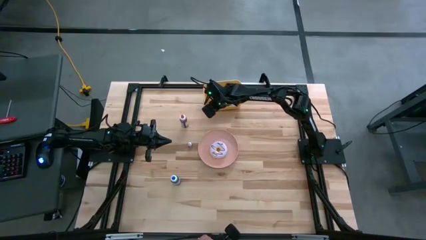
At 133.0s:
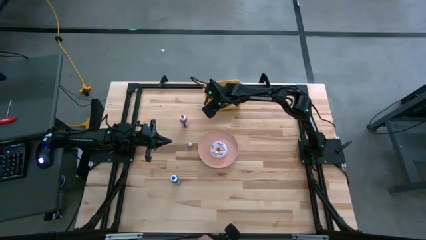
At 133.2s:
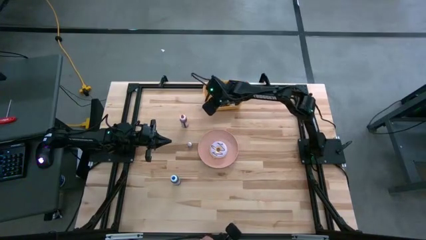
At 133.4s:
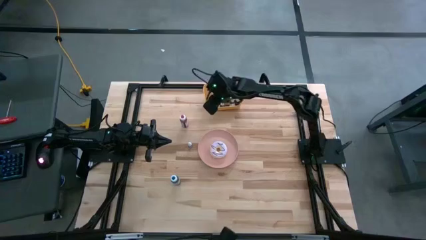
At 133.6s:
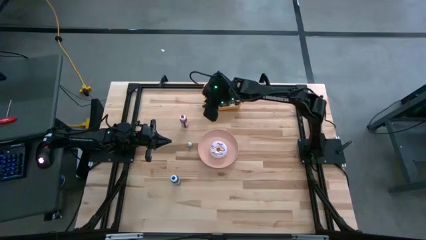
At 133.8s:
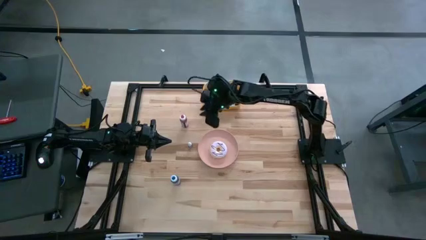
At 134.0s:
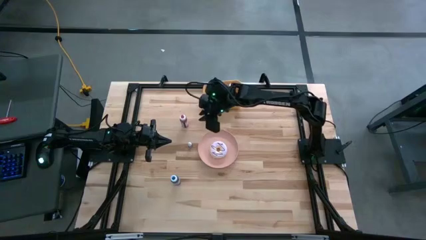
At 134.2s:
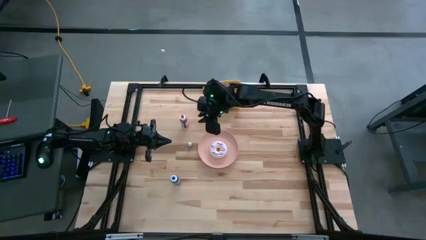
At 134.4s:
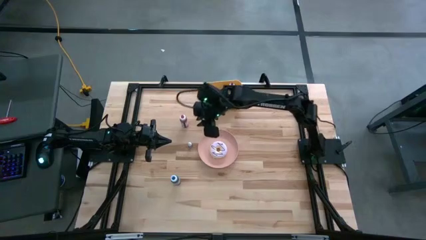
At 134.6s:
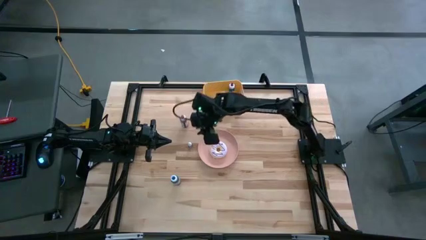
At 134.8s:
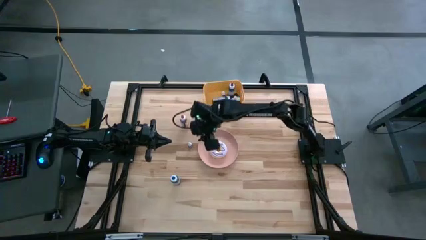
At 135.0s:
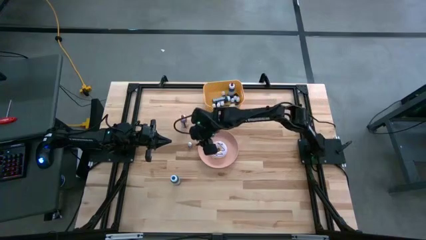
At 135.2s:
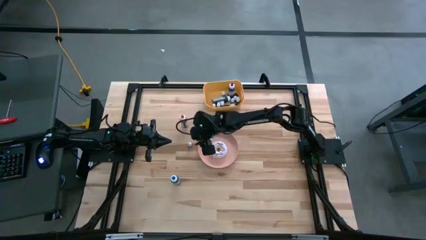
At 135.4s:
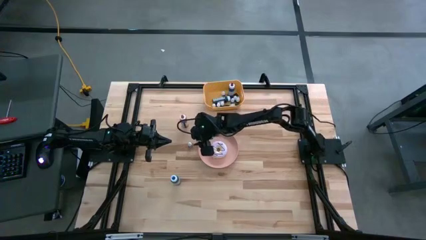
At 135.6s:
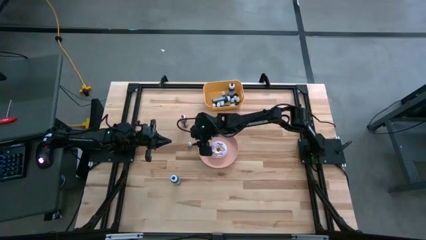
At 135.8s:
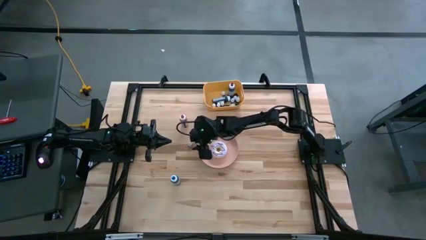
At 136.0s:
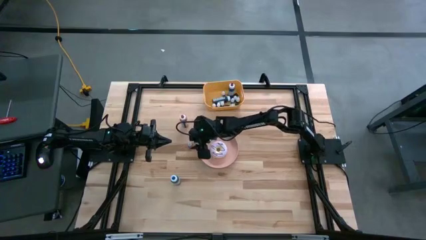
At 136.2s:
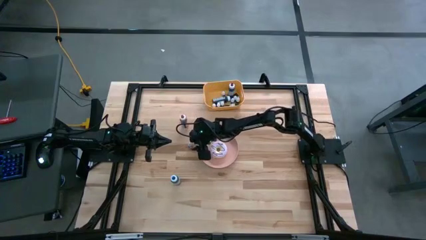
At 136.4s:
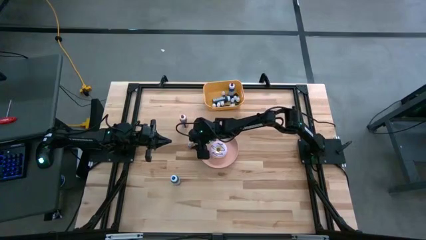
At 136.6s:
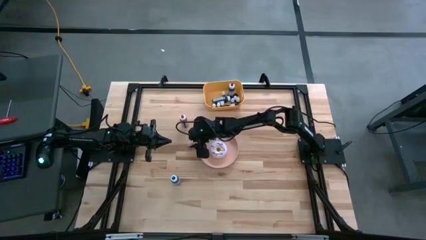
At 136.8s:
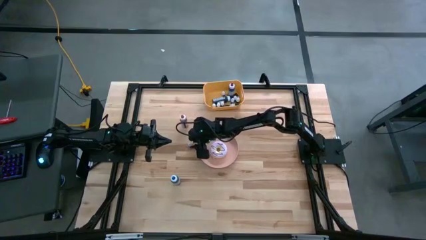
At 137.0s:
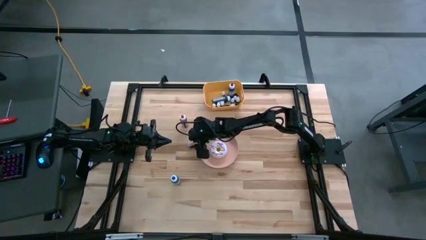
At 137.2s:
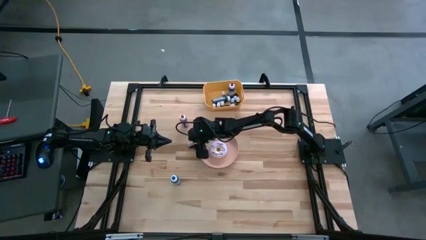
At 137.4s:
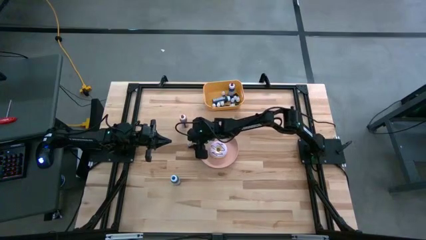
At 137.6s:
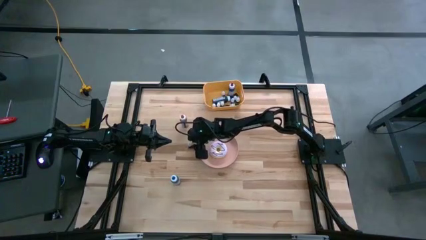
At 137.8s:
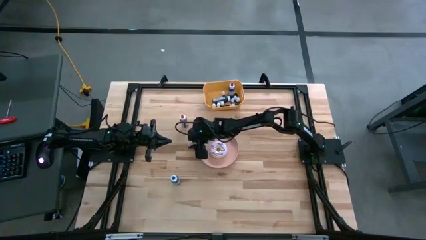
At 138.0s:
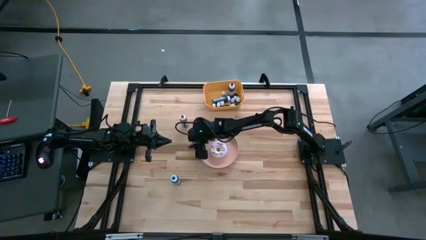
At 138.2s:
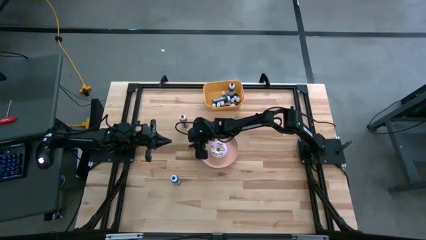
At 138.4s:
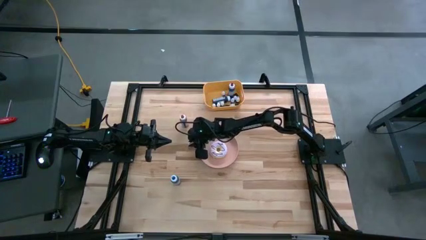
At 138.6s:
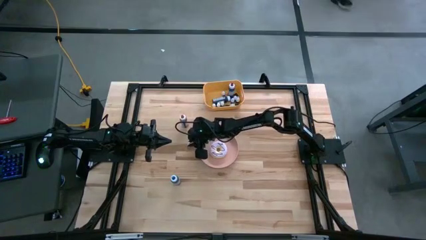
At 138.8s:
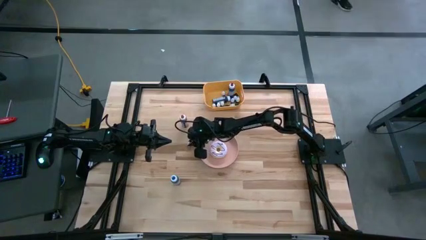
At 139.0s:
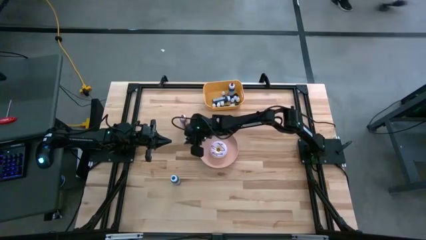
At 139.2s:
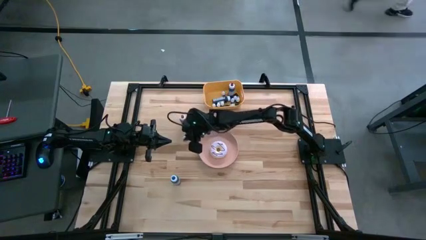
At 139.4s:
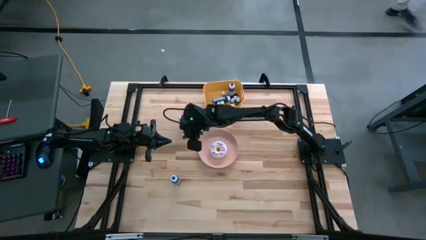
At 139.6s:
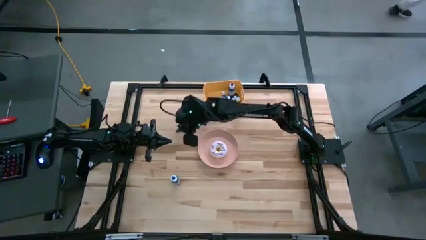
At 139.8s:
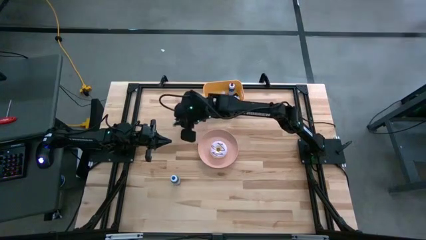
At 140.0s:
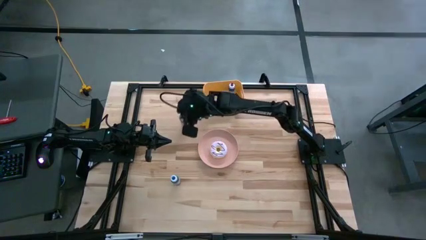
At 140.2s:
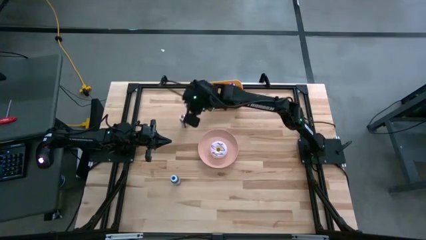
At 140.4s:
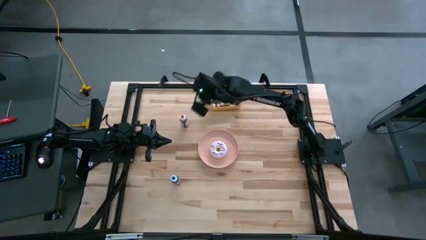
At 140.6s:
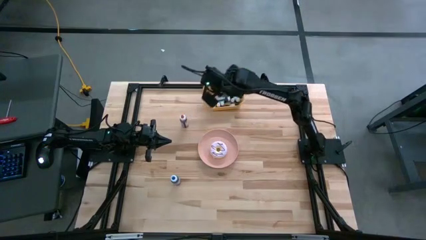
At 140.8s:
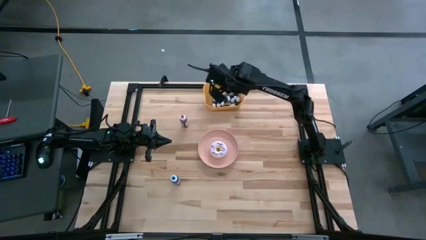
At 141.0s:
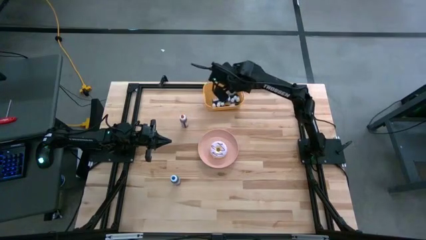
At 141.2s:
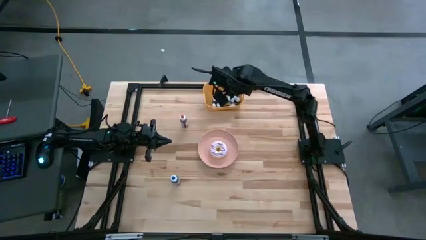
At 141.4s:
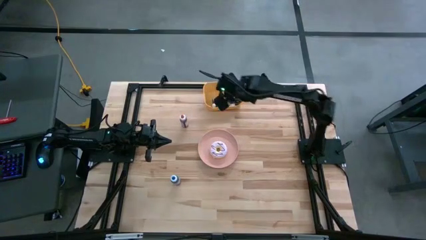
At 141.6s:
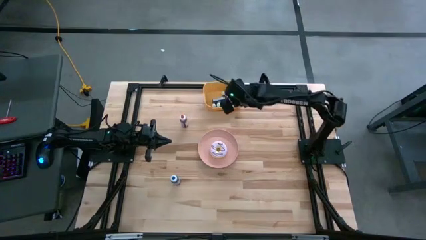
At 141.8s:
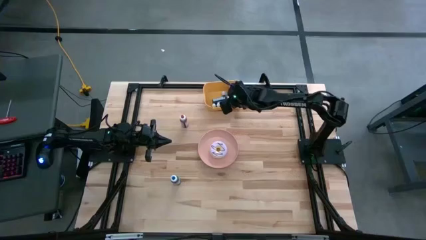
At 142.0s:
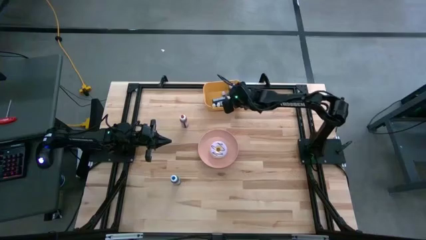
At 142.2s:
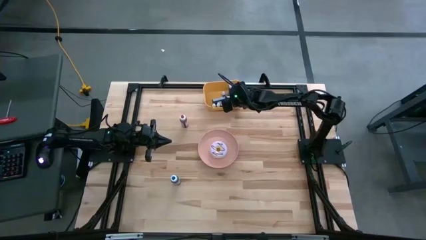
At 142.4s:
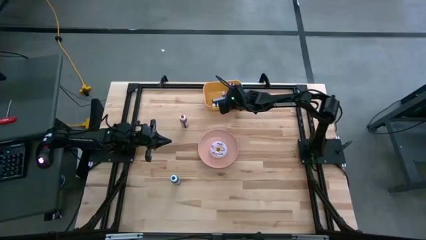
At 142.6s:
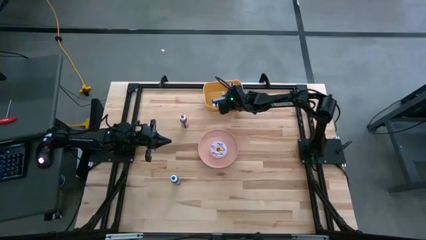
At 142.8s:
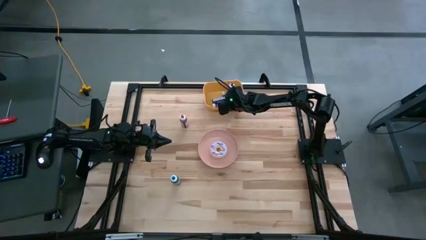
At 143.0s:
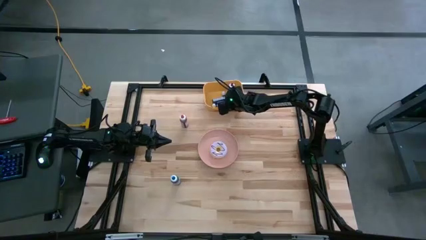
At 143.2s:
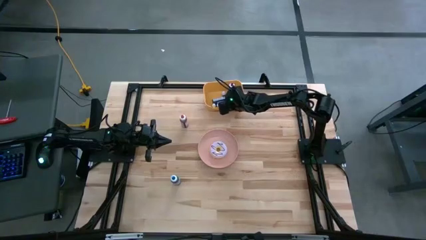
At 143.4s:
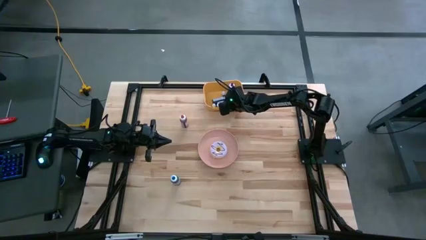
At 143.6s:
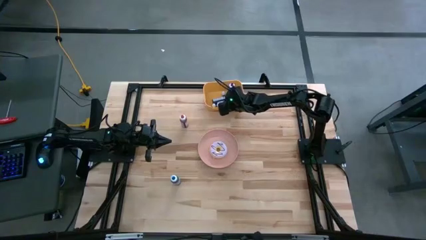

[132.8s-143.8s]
Task: Pick & Place food coloring
Put the small black food coloring bottle into the orange bin

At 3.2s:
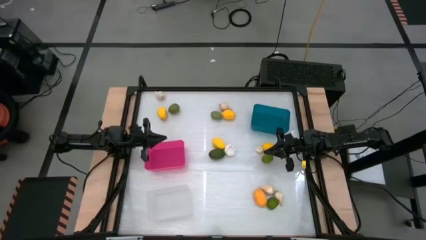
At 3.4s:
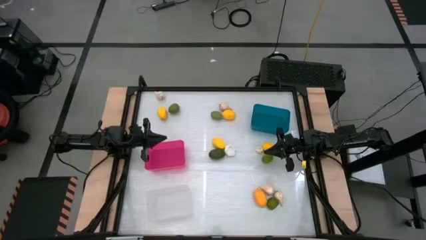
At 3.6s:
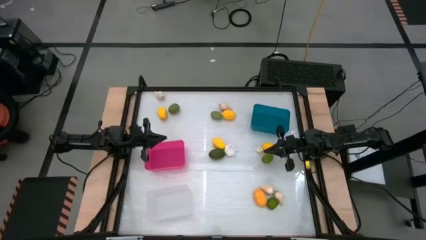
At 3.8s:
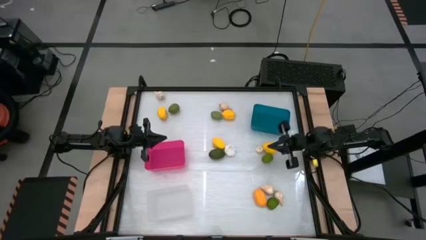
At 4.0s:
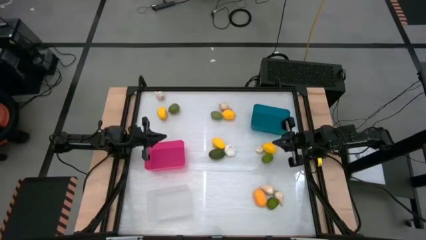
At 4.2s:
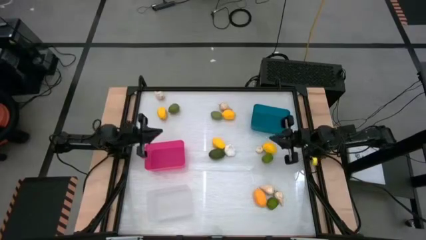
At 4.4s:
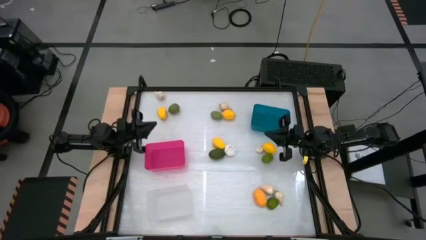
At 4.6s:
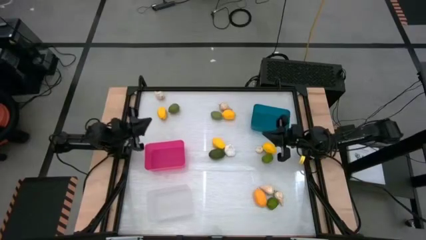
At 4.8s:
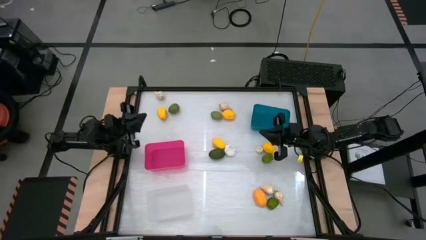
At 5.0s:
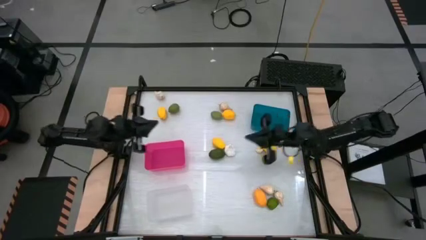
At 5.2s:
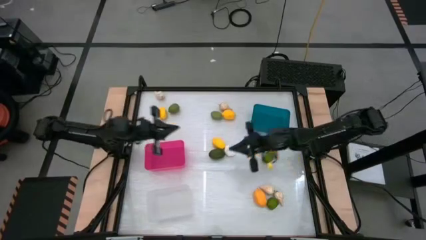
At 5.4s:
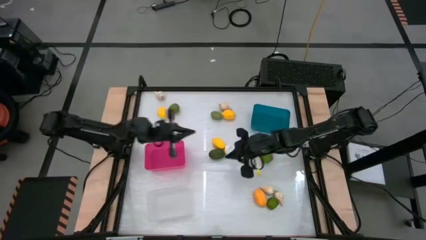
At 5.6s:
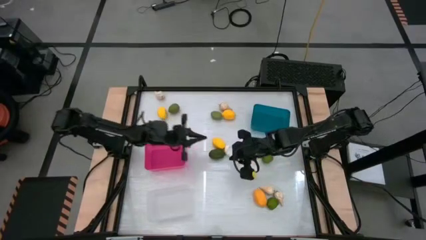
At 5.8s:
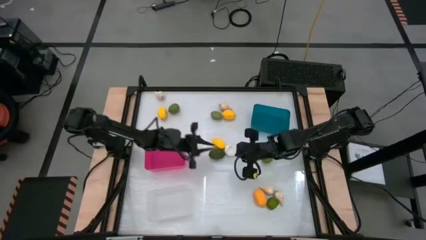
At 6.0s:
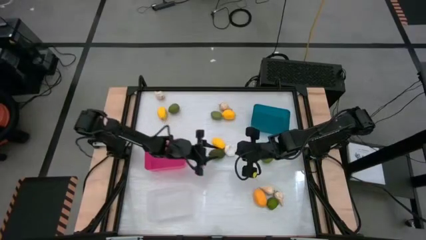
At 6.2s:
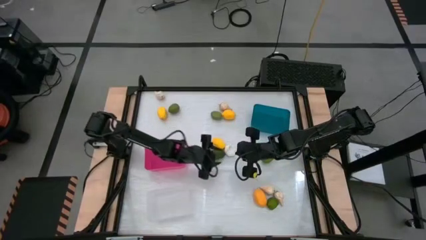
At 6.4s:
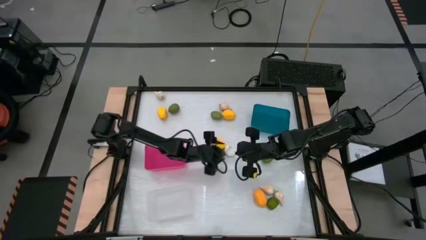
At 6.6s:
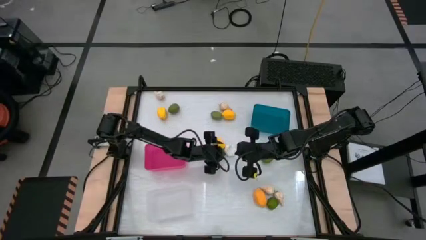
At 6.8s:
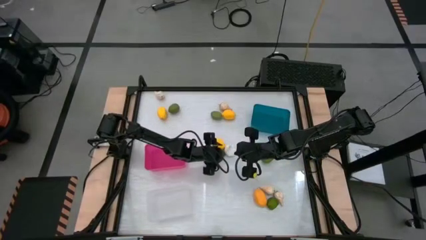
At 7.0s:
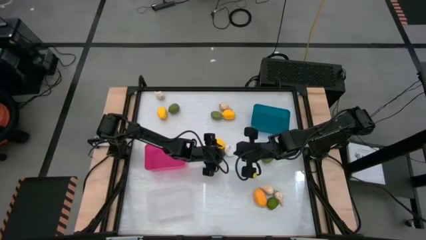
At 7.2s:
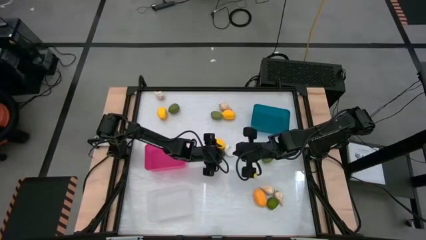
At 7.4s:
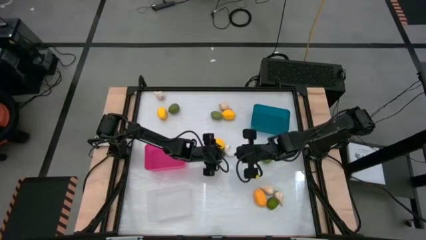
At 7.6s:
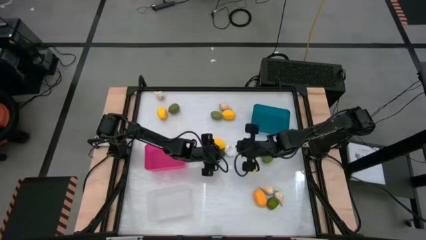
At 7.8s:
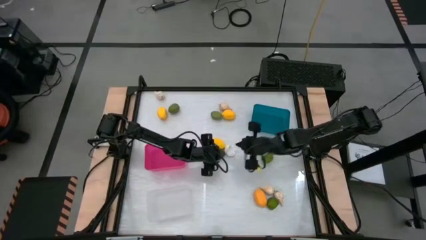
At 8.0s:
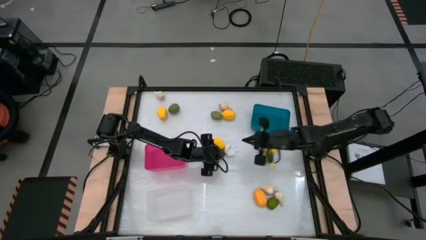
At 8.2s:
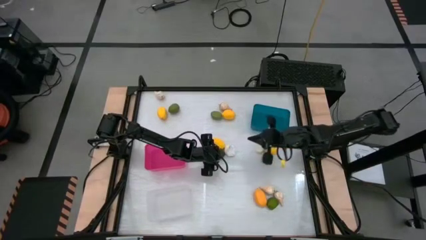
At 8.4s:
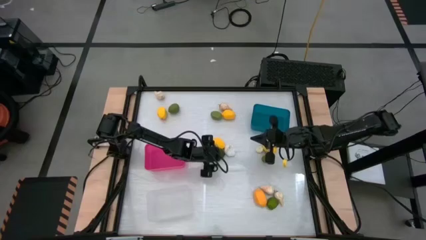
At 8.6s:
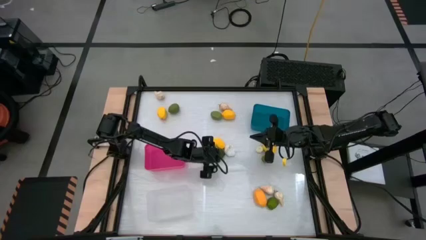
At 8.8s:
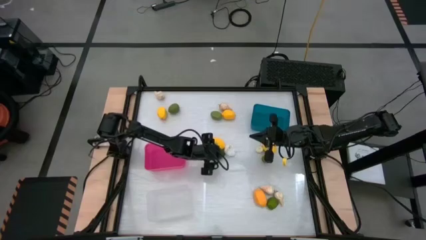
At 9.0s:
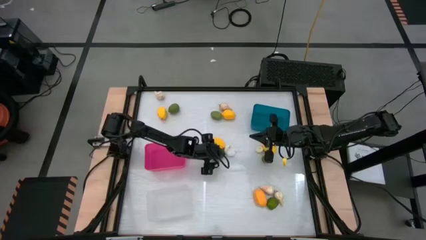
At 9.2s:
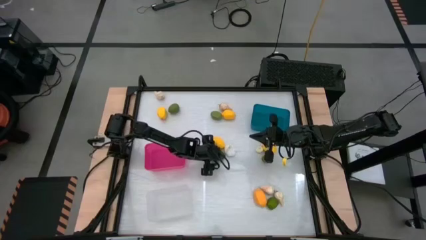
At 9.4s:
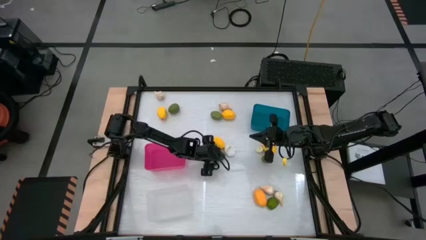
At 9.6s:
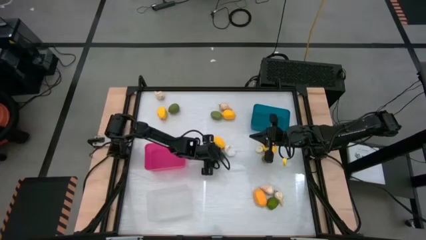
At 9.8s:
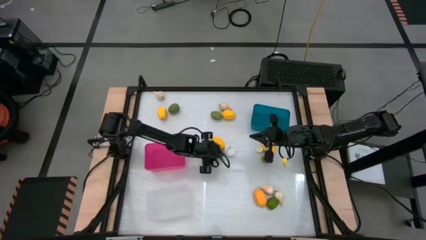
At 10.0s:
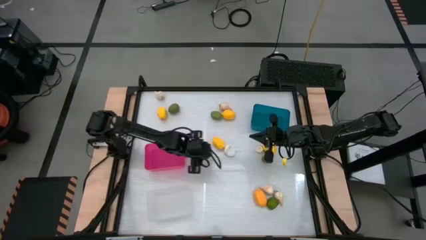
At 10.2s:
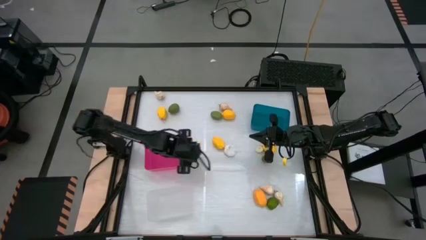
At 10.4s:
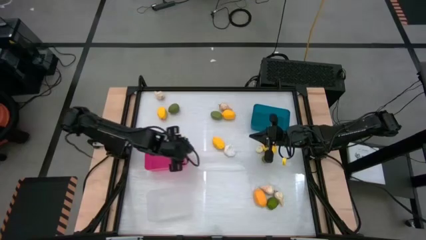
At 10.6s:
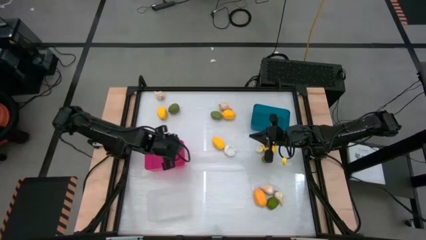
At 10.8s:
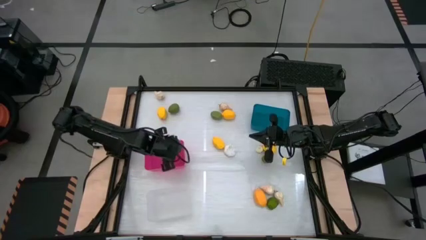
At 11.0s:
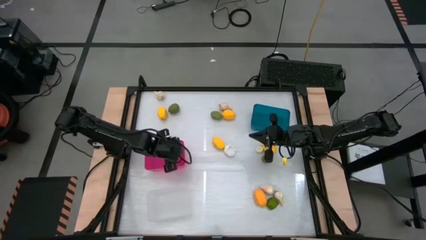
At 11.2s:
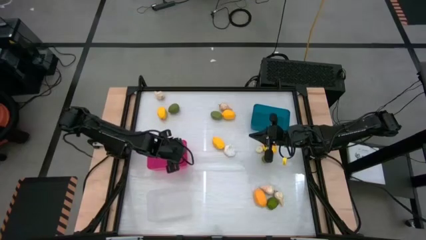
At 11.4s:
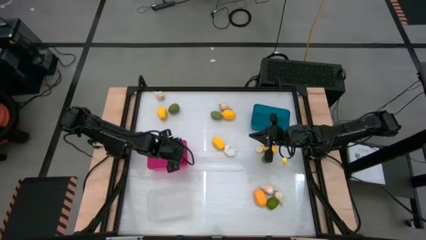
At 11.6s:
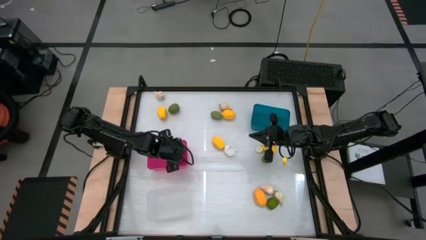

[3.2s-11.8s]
Task: Sort produce into baskets
Put the lime into the pink bin
